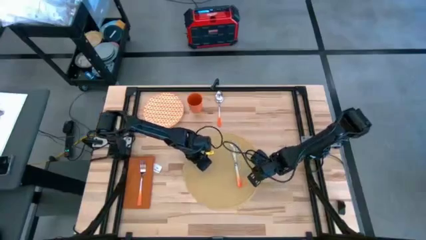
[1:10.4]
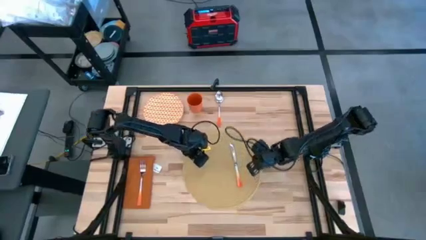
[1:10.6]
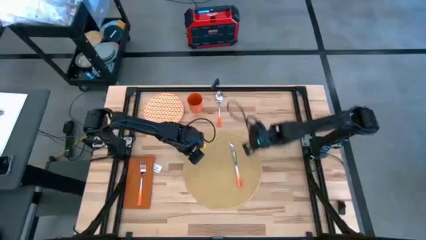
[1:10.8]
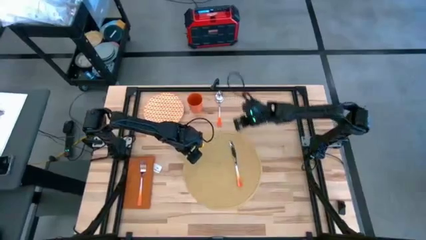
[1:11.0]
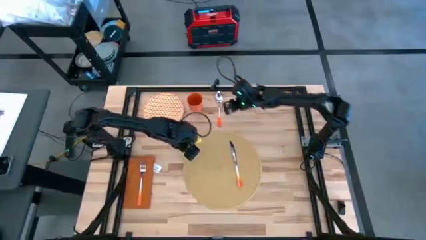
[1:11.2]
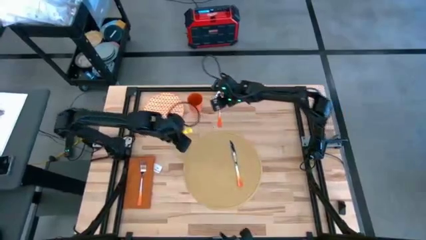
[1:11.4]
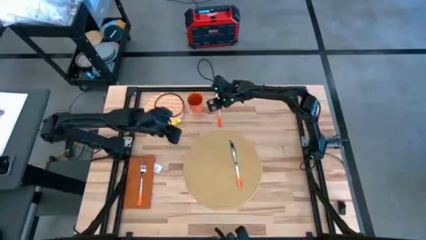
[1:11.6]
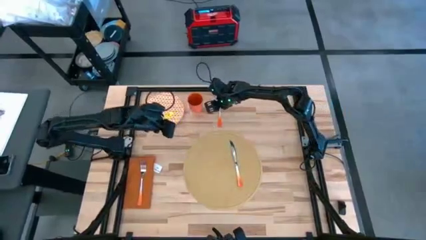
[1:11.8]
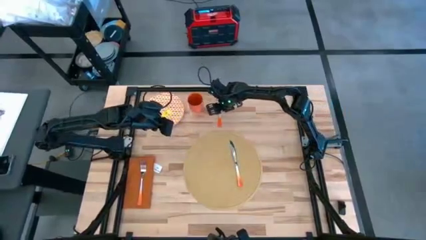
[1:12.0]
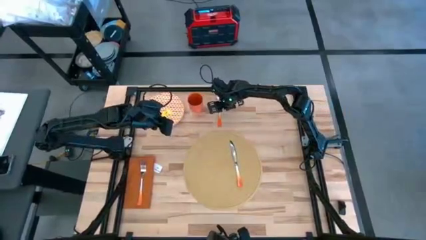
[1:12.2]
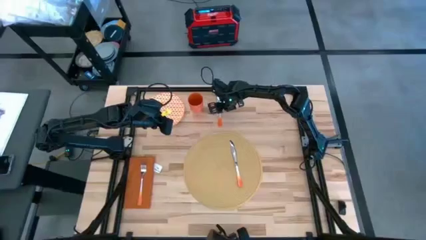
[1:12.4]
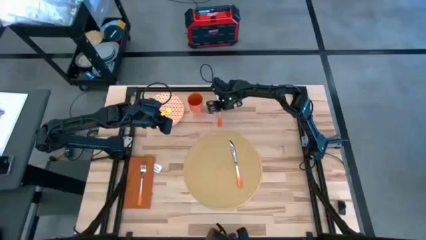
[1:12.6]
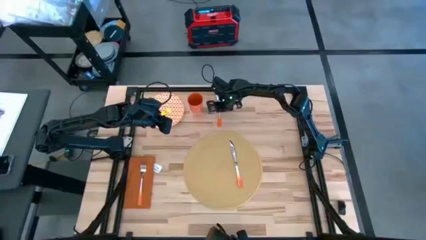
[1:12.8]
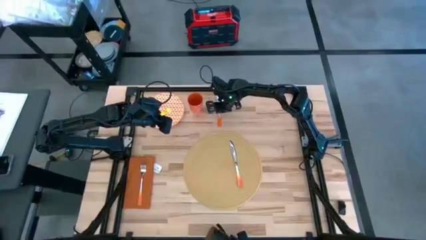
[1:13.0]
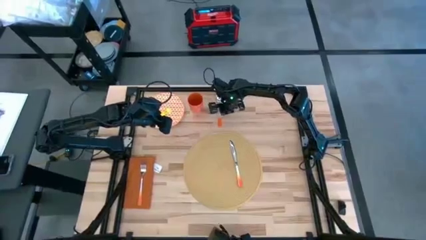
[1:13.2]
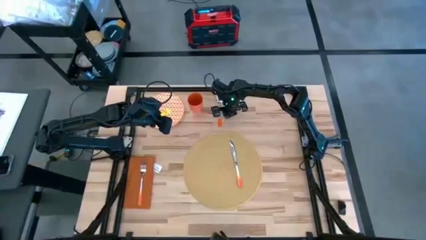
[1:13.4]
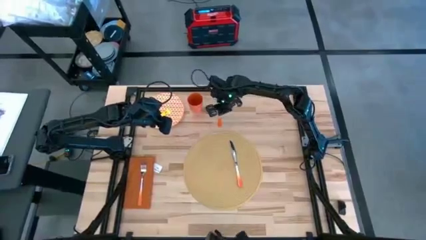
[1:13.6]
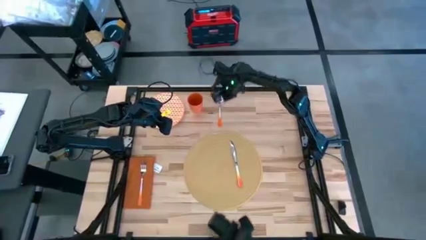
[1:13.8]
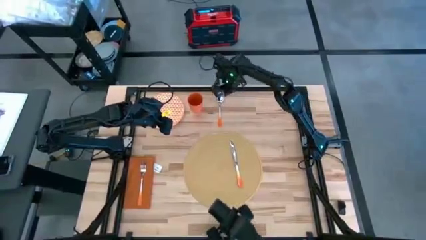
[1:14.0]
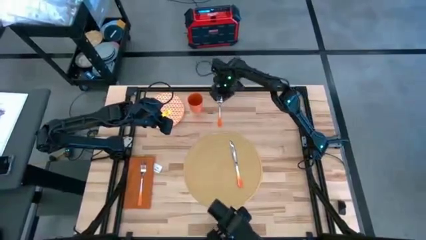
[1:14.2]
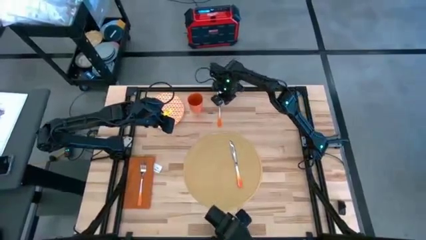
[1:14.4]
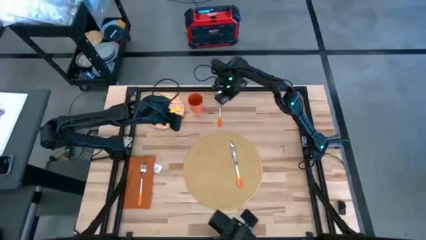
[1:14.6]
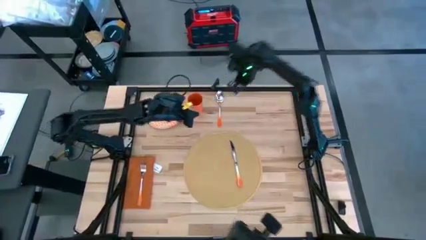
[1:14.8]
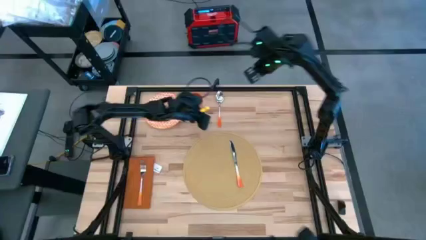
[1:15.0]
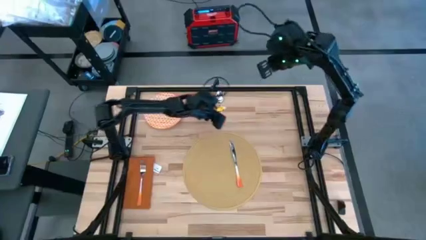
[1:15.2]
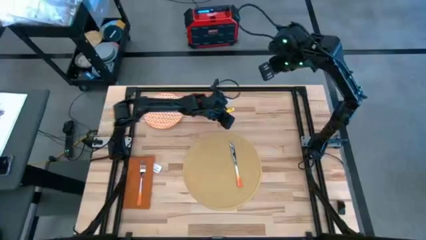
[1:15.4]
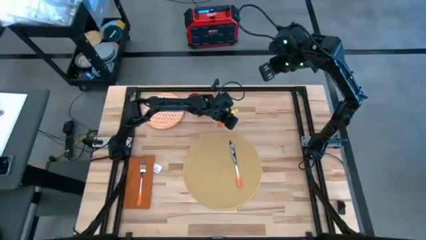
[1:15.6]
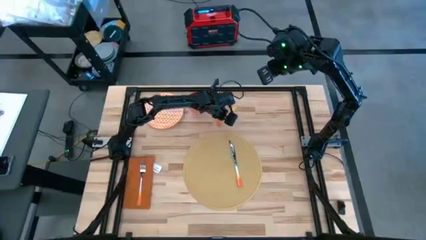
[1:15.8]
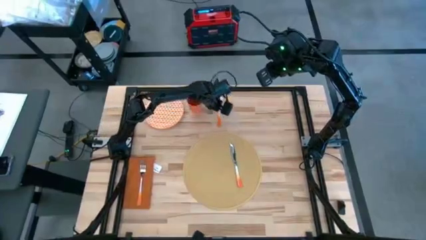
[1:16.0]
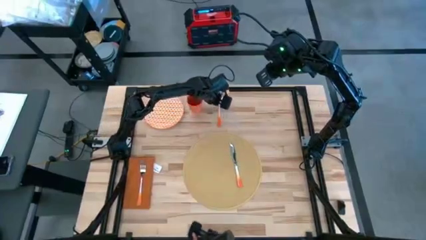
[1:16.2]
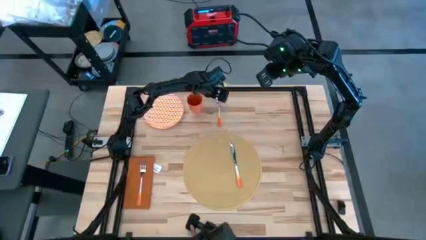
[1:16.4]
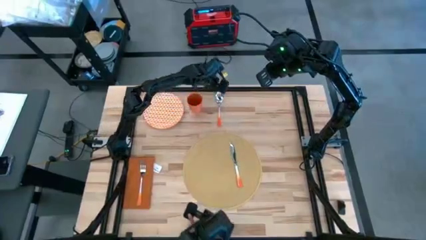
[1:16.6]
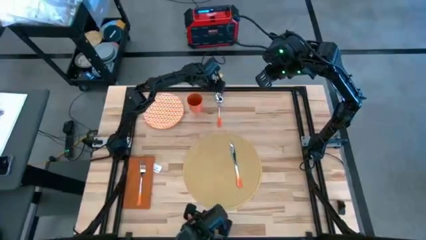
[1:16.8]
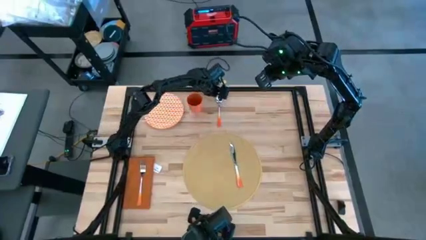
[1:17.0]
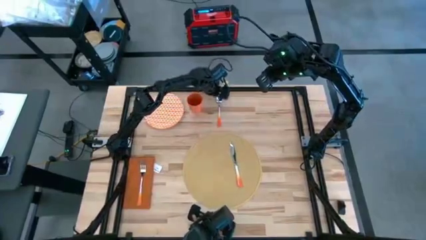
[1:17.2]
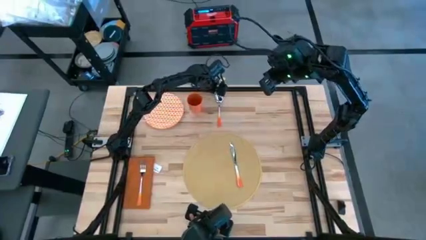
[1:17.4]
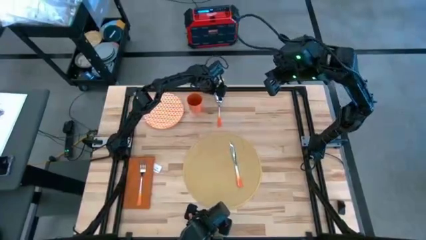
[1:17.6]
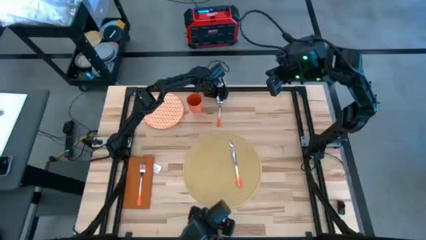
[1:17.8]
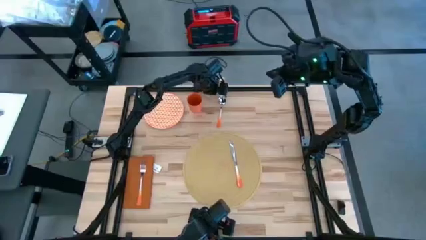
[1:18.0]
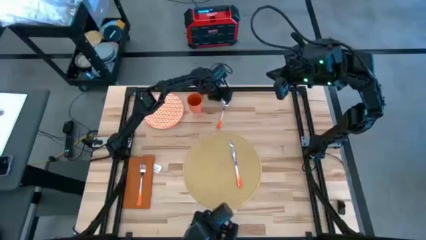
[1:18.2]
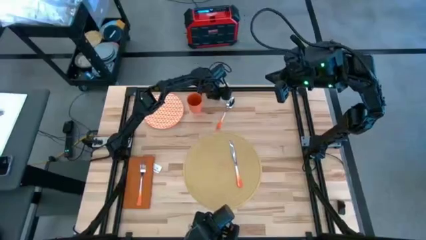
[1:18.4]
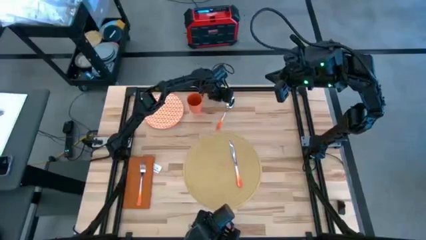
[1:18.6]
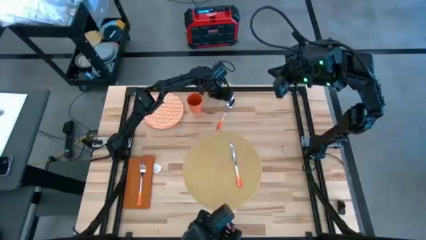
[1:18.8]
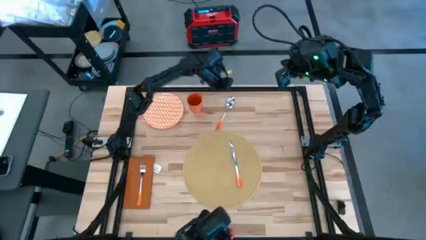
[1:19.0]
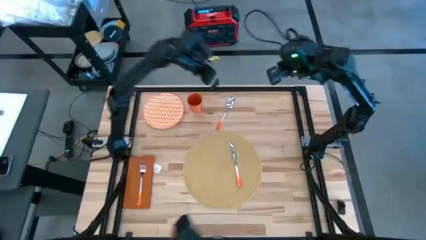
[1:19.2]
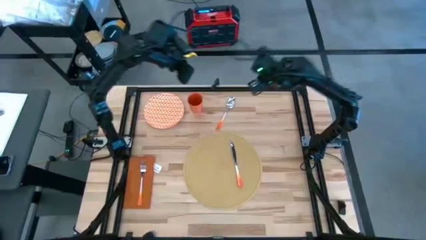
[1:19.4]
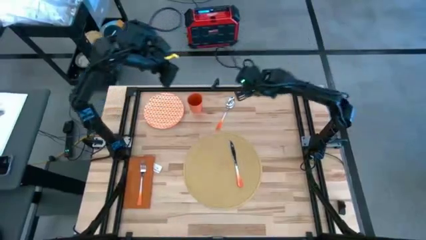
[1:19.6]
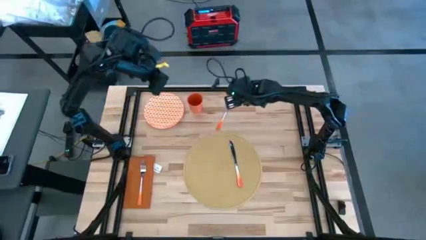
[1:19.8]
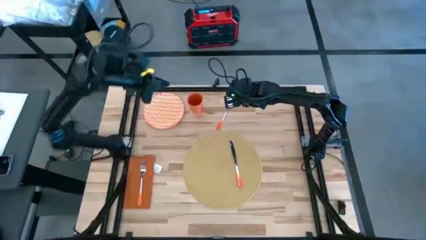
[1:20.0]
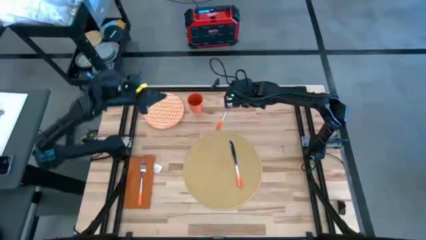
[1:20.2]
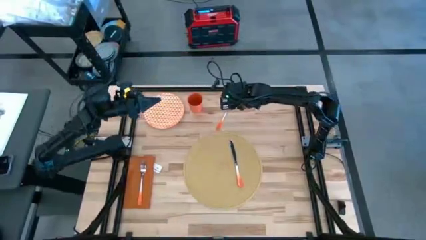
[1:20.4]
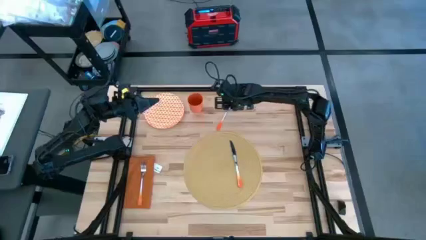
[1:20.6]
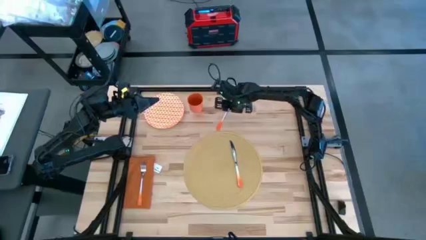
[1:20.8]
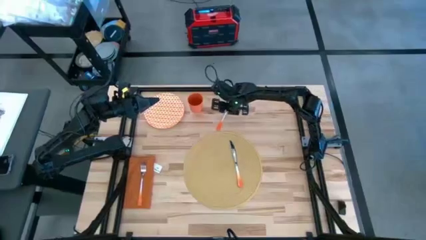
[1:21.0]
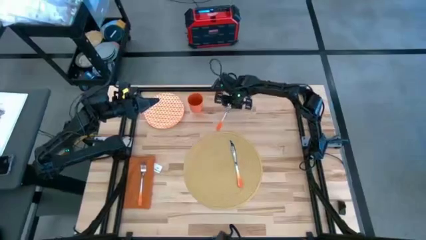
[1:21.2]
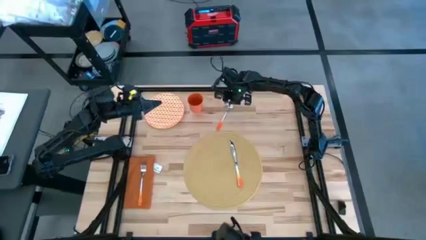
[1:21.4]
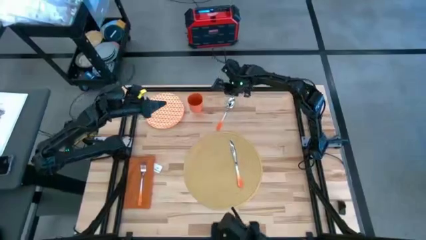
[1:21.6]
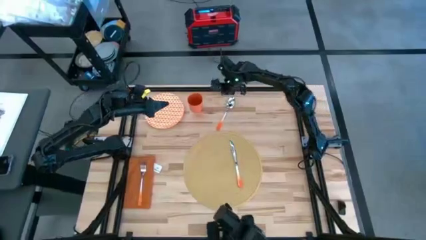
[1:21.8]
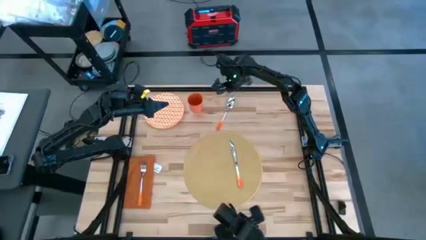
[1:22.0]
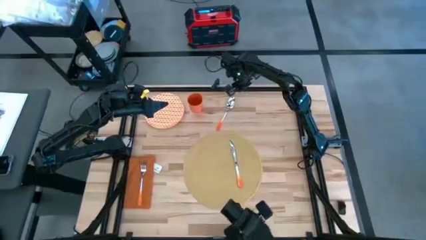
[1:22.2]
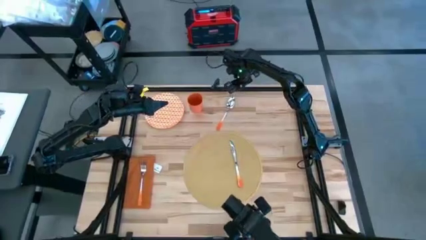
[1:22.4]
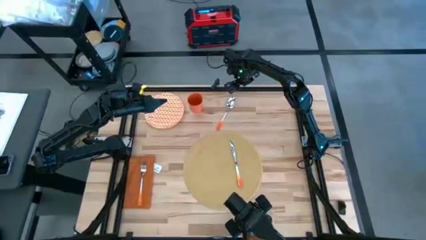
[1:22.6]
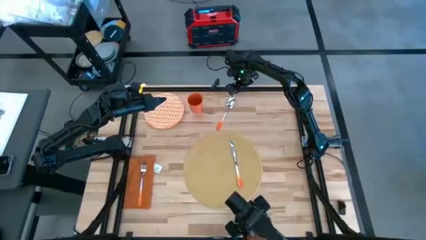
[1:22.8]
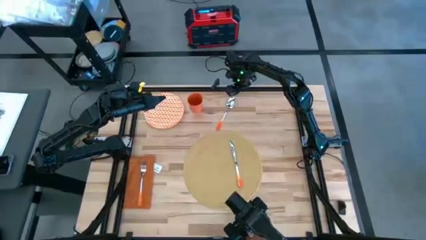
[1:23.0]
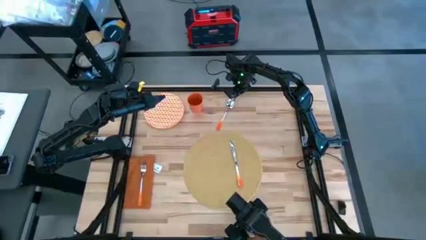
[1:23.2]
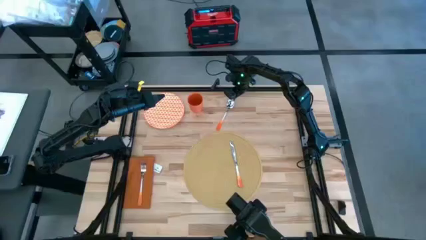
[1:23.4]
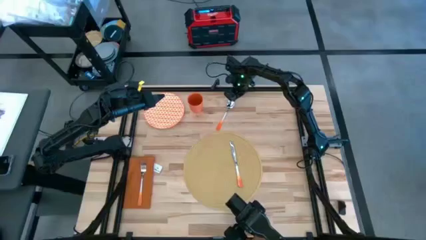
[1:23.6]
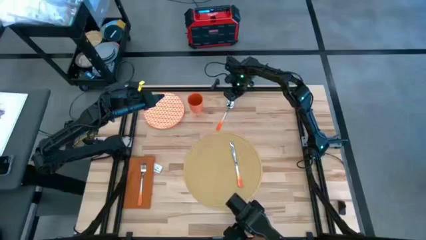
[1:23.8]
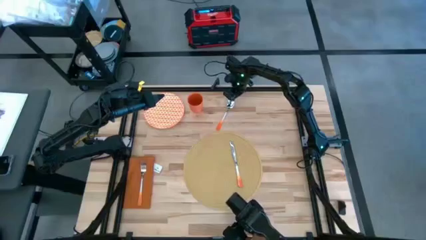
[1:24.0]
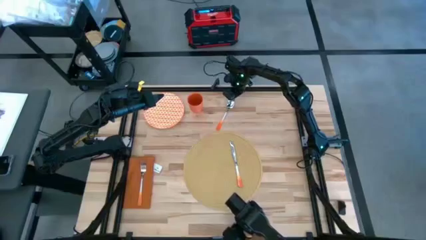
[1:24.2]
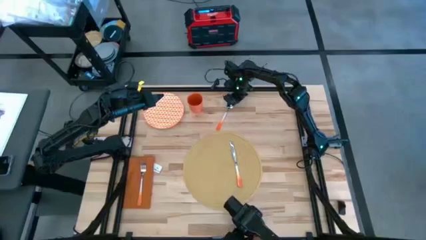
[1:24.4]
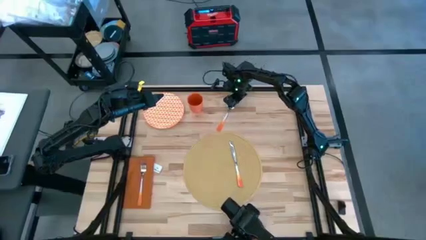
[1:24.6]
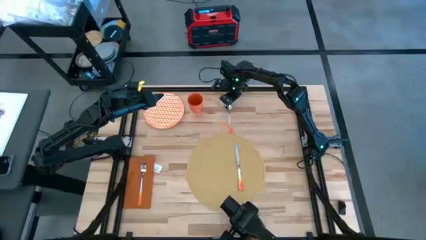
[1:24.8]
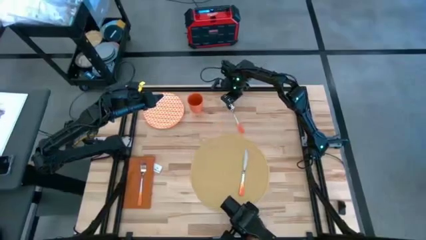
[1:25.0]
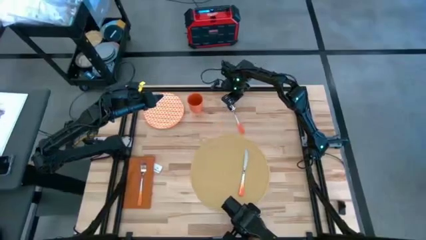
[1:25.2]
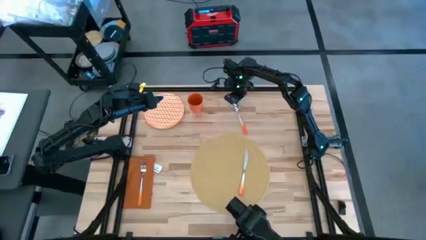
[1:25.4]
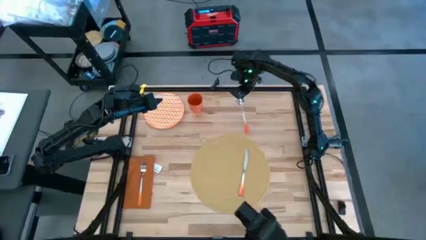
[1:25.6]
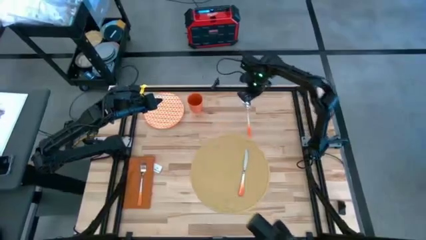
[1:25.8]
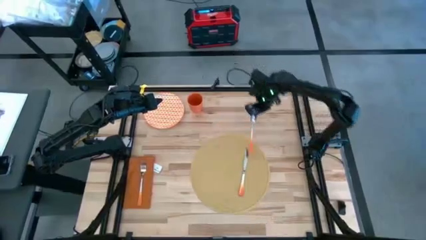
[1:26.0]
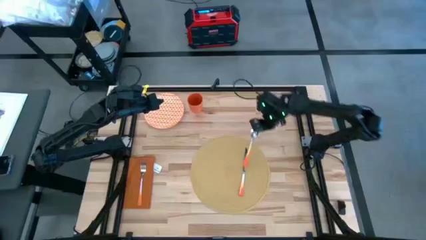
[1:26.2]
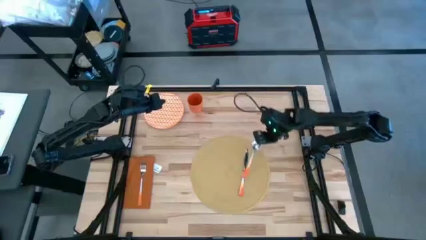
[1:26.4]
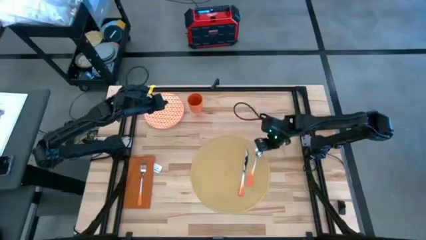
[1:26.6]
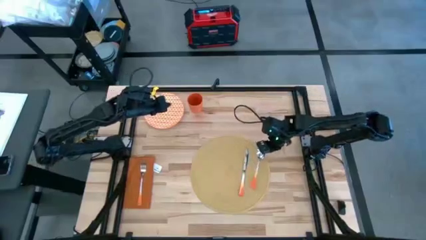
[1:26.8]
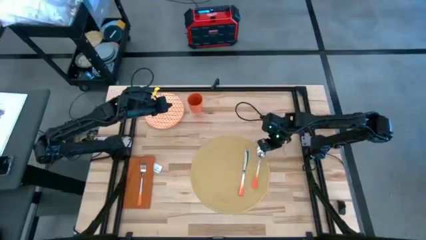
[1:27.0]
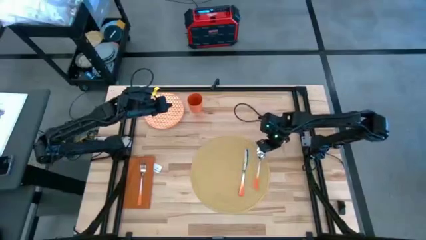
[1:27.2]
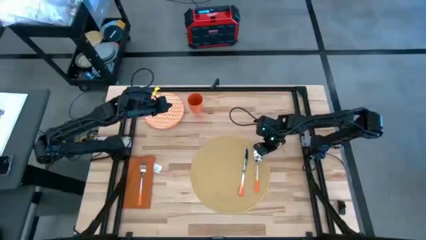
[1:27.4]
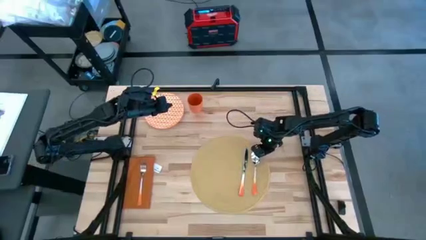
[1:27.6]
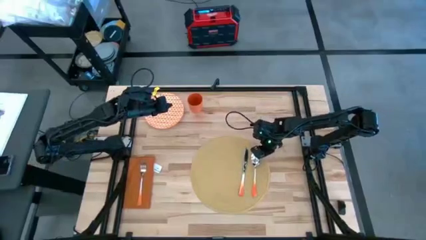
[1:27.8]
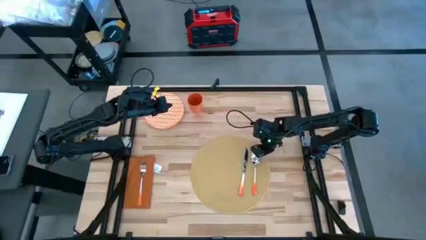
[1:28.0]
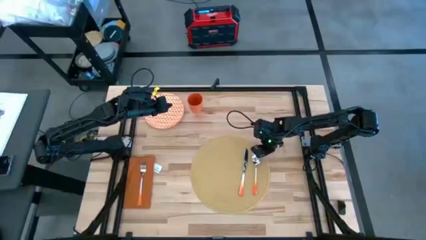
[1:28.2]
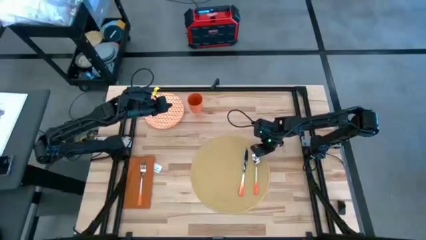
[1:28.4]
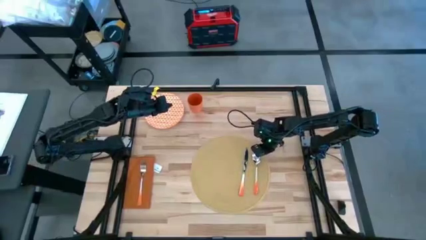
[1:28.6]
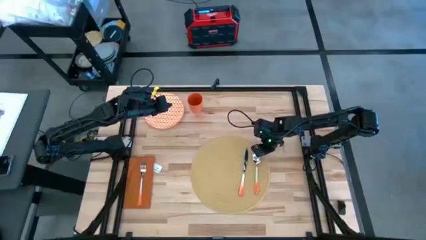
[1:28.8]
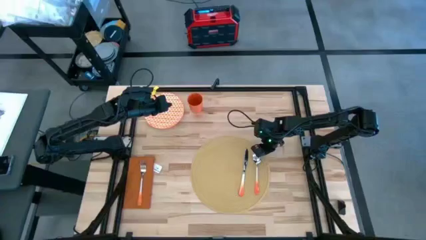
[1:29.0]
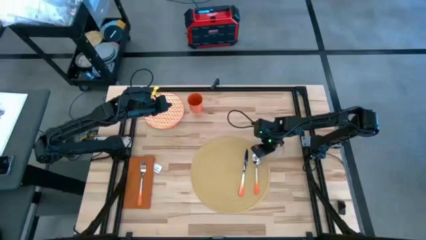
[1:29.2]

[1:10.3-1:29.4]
Task: Set table place
Put the orange spoon on the brown placemat to the right of the table knife
